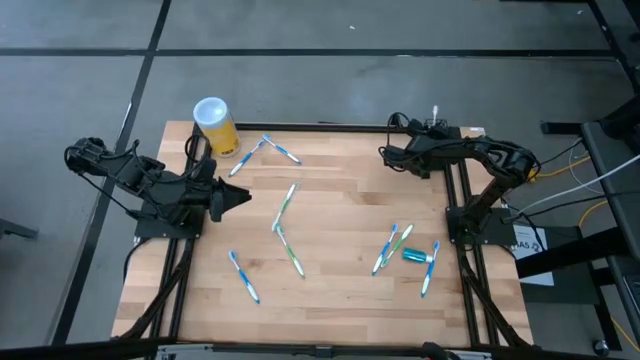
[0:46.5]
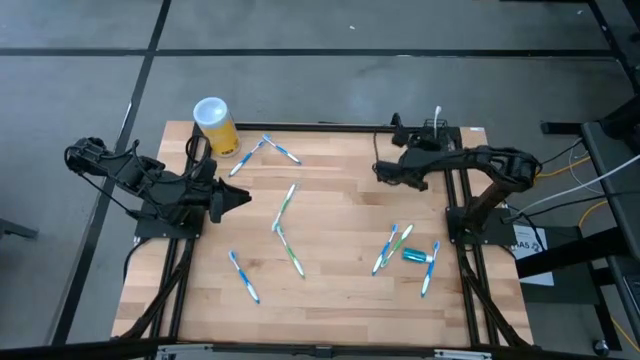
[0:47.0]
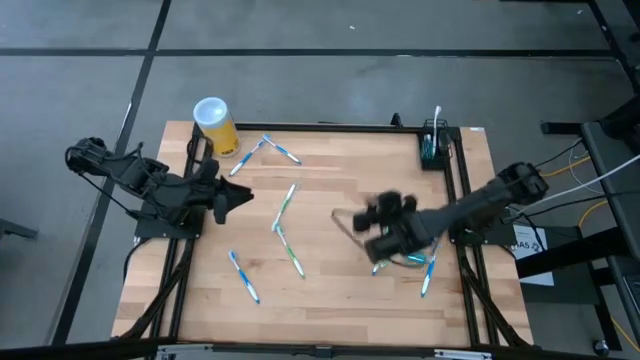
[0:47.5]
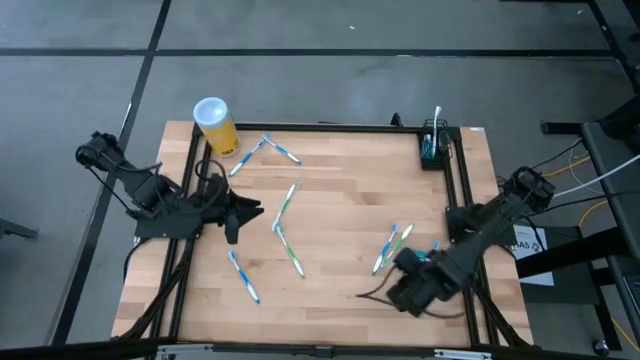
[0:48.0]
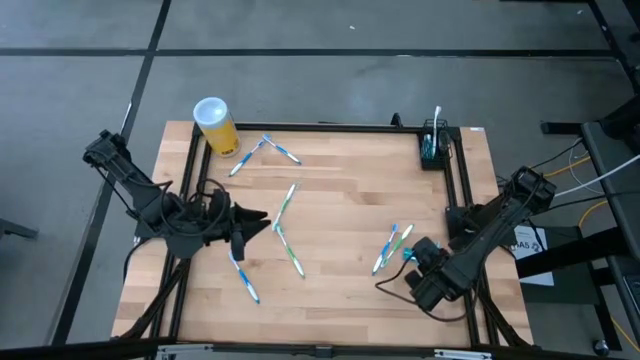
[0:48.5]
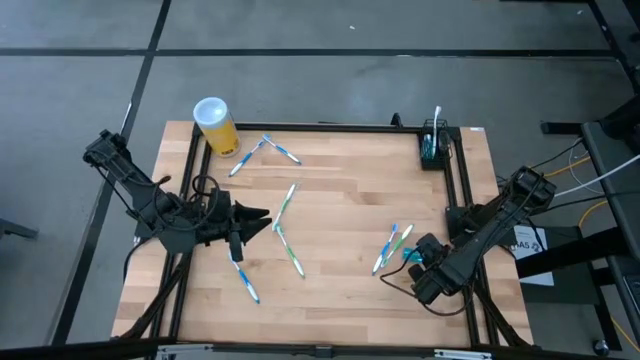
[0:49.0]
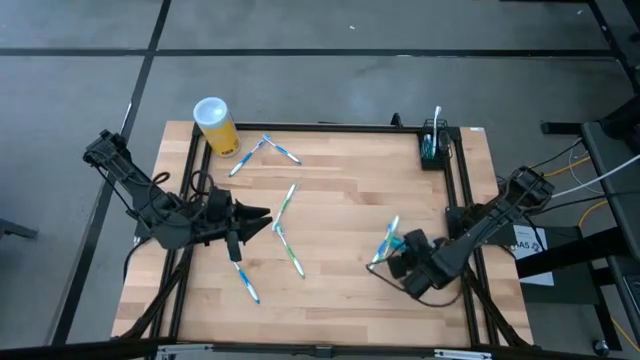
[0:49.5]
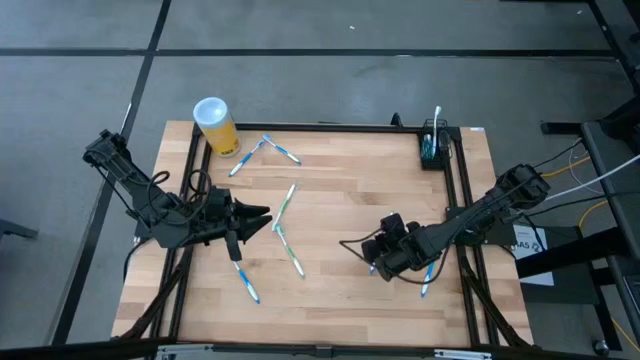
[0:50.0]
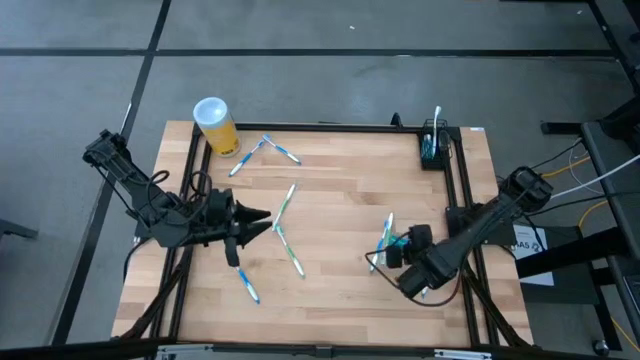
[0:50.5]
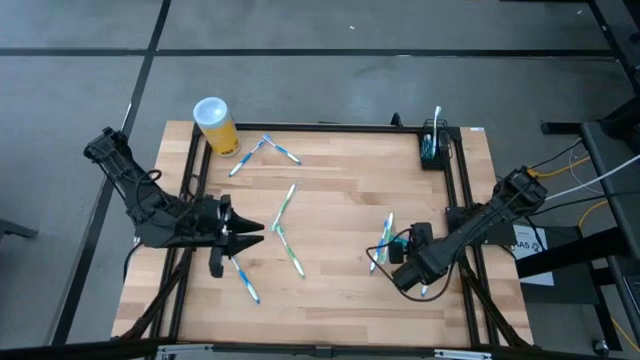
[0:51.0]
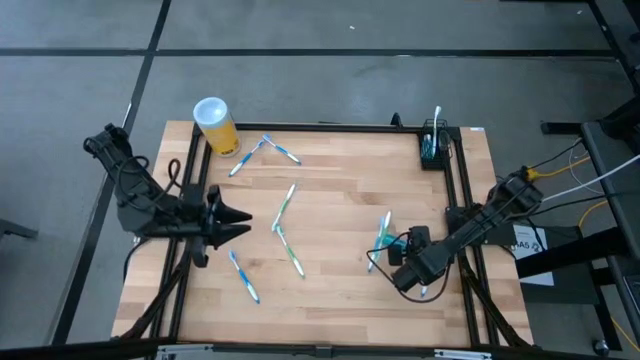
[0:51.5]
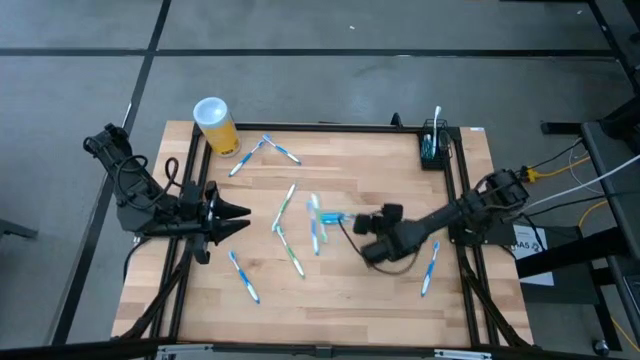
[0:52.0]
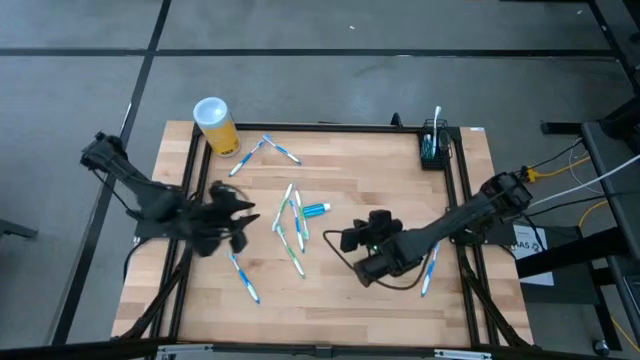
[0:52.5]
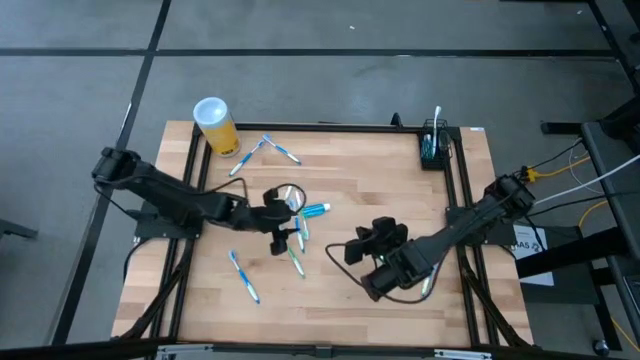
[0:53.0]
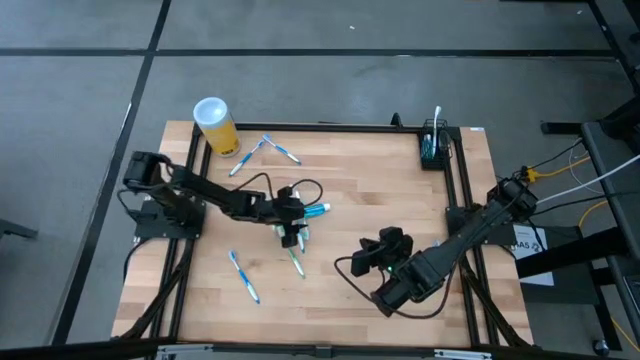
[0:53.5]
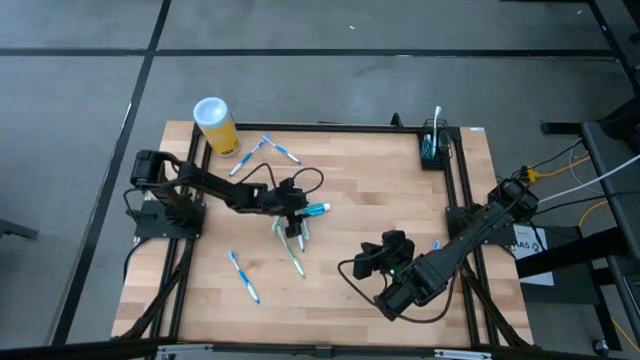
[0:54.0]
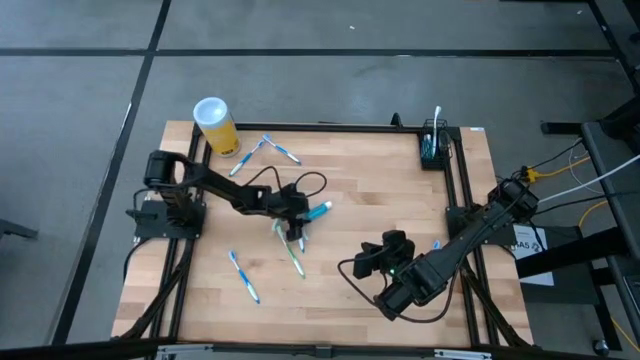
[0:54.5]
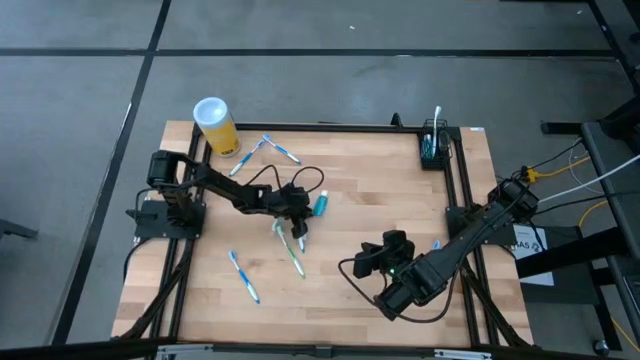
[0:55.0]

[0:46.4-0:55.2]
Task: Pick & Place toothbrushing station
Put the blue mouthwash into the mesh organizer

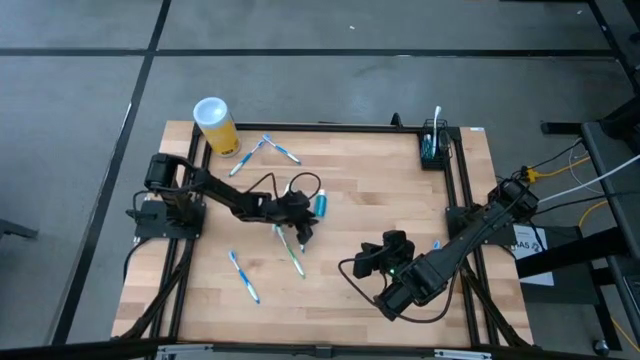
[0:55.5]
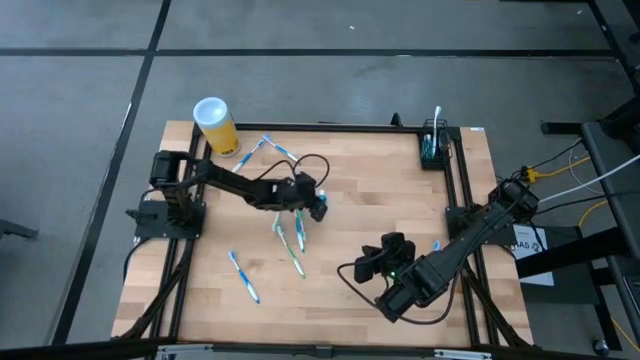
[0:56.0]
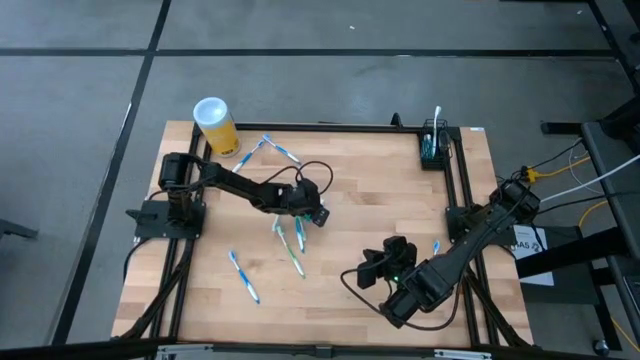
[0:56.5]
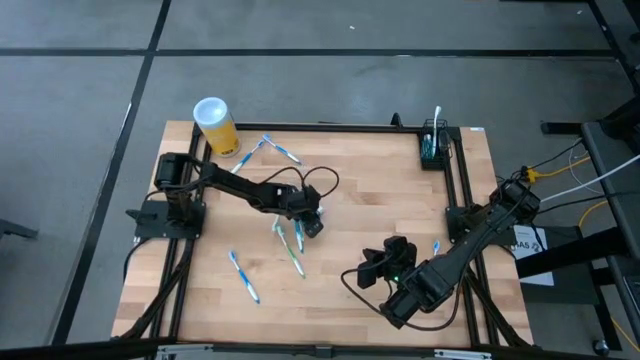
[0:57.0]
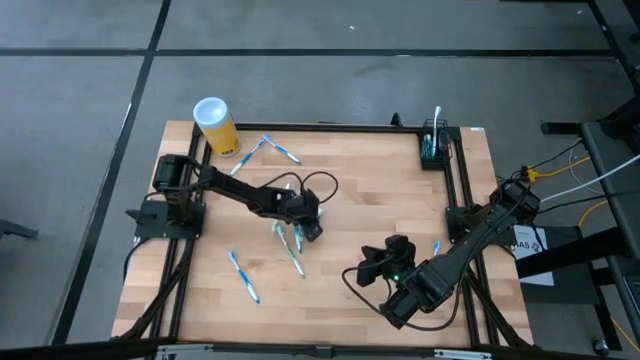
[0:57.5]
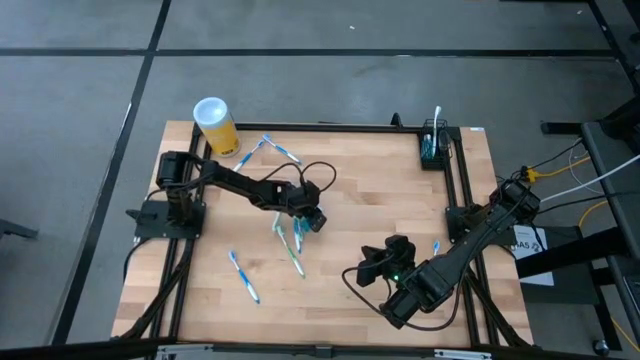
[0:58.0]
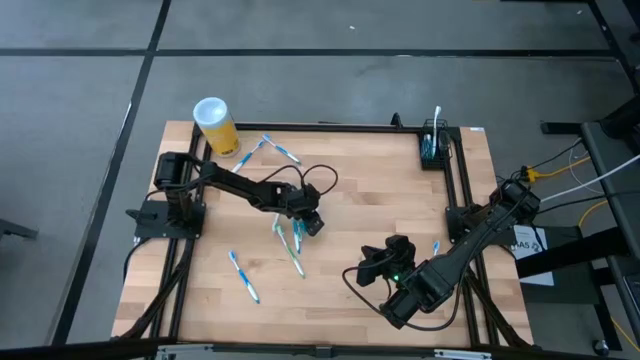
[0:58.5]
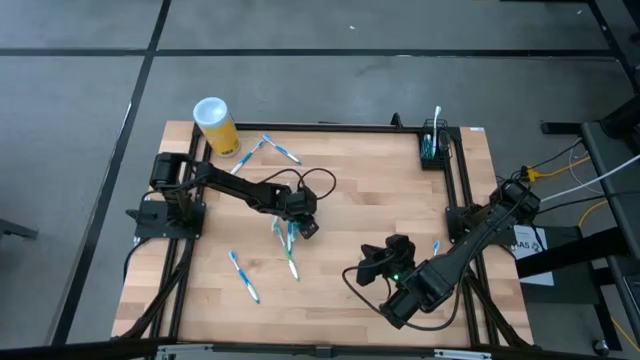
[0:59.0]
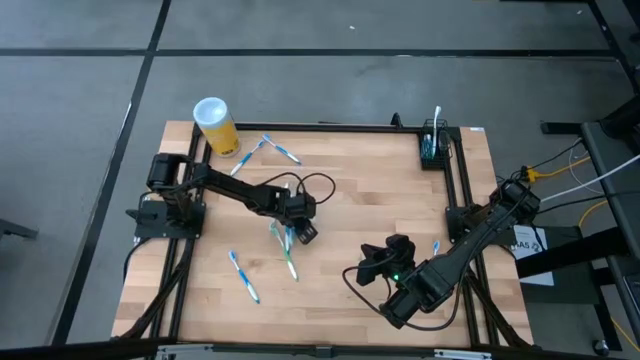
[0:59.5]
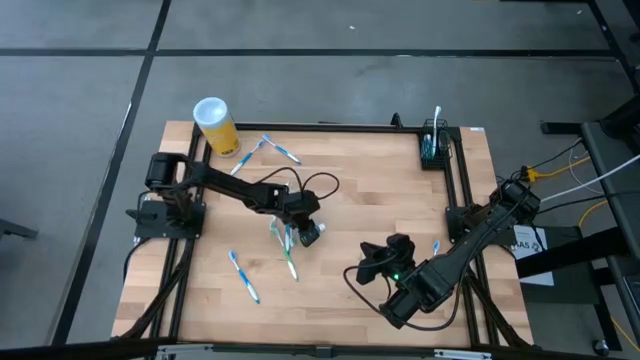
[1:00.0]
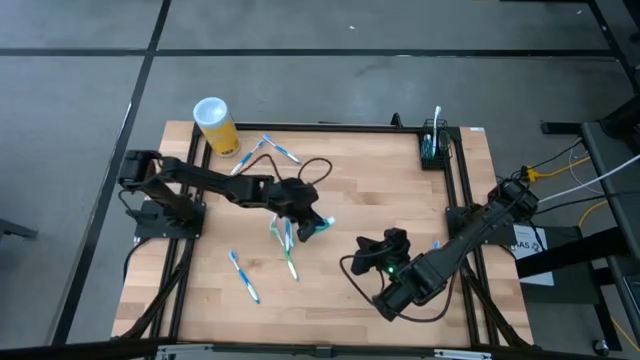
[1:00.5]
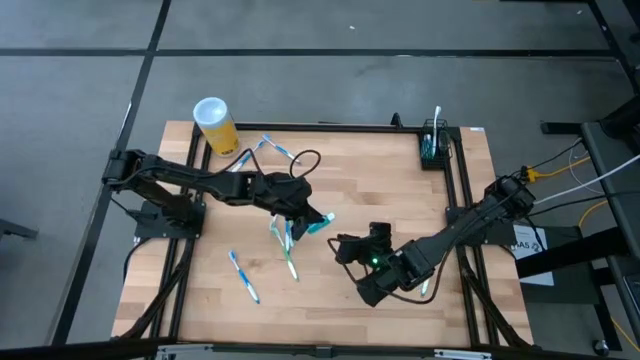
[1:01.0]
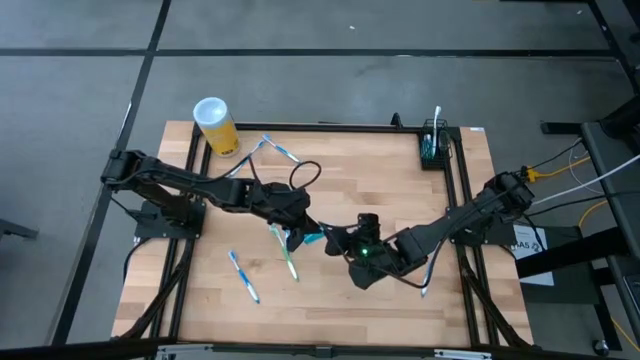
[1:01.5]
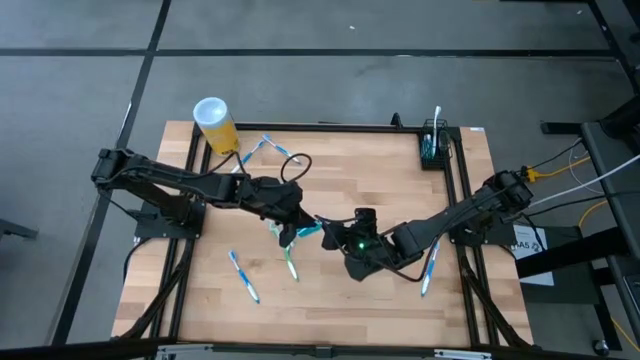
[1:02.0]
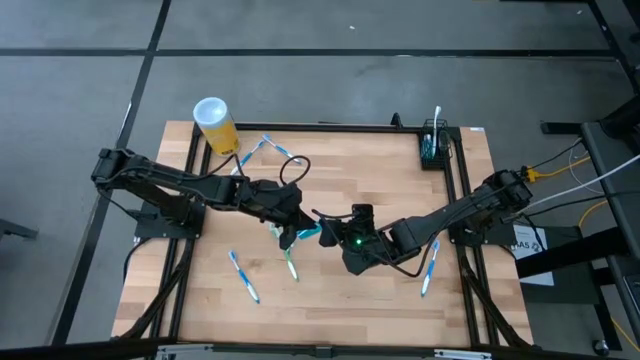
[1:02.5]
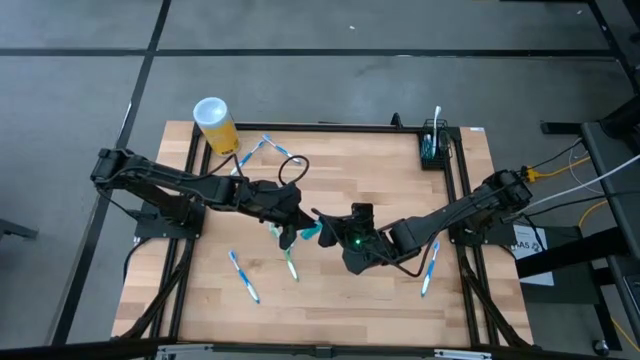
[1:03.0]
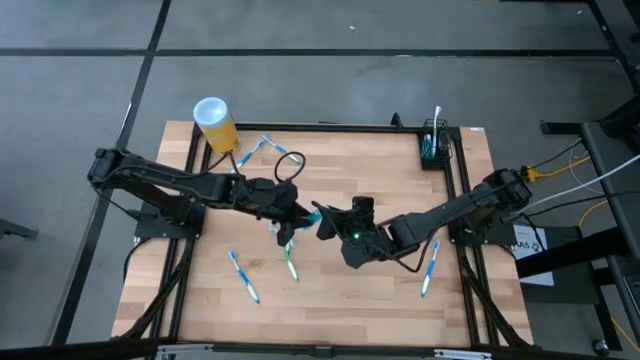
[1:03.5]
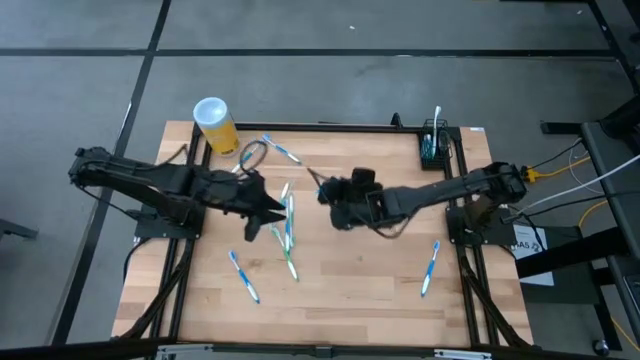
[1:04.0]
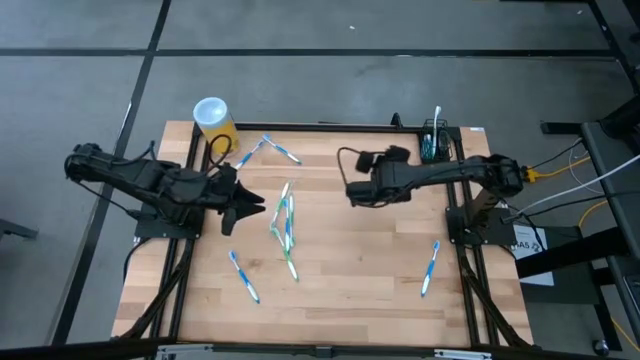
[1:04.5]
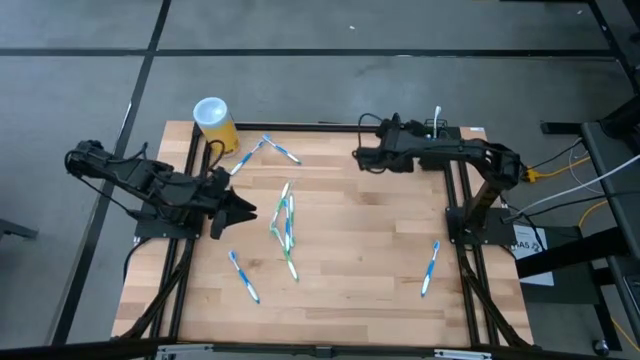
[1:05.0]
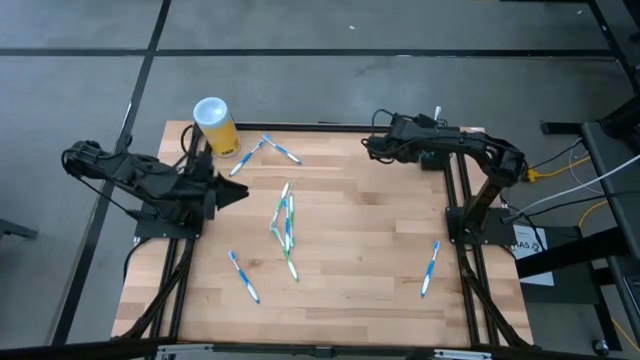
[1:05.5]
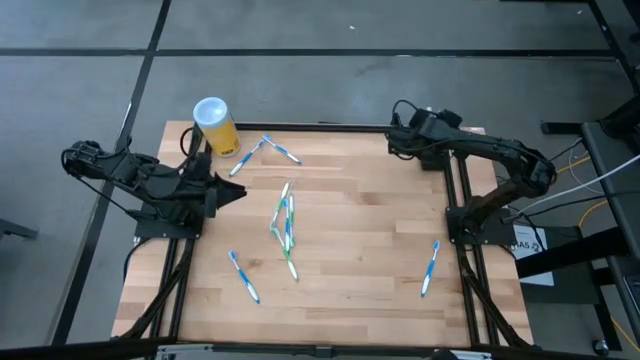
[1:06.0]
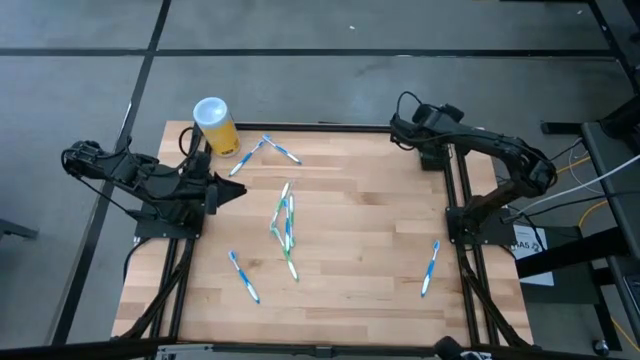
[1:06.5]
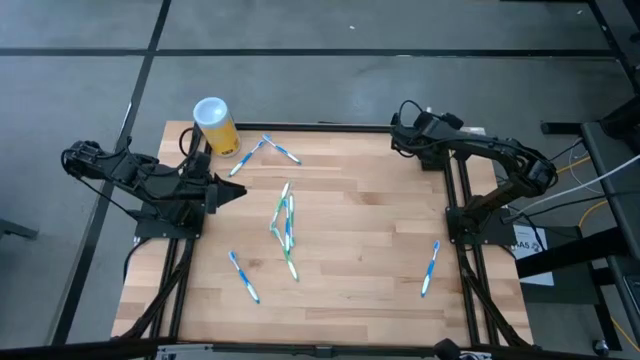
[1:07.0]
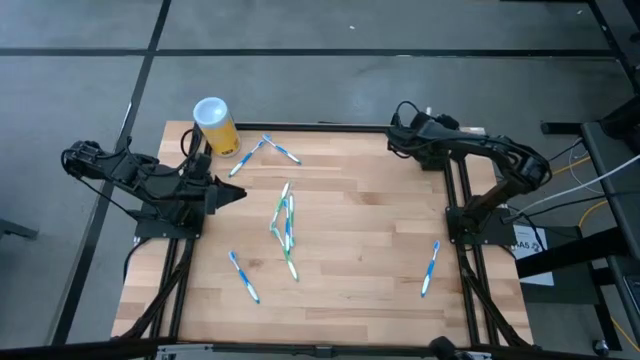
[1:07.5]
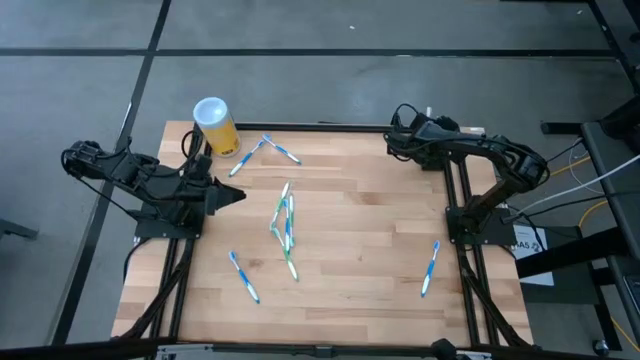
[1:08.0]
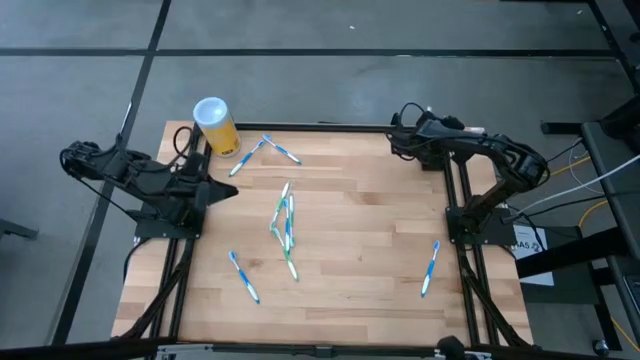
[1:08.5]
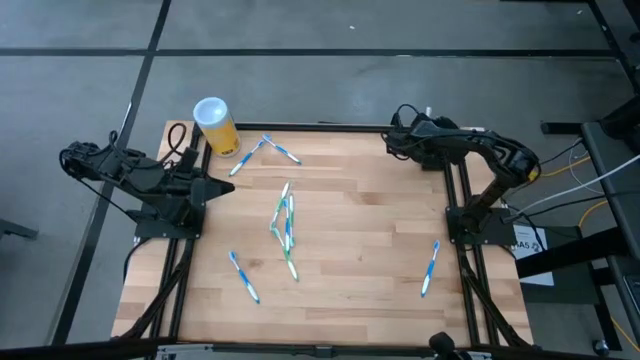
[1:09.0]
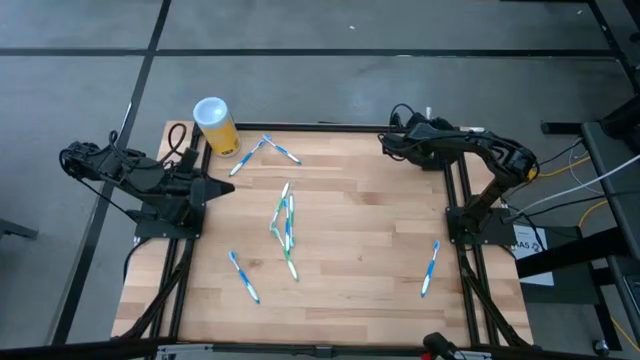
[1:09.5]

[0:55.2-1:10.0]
Put the blue mouthwash into the mesh organizer
